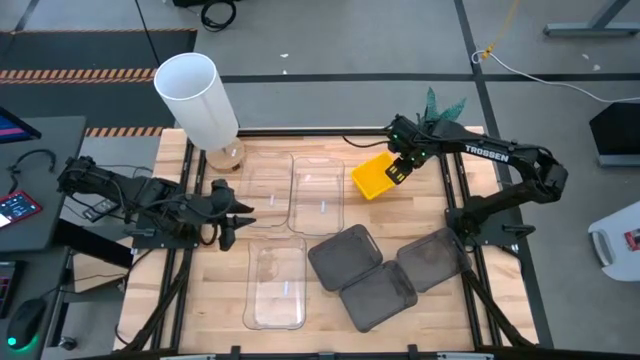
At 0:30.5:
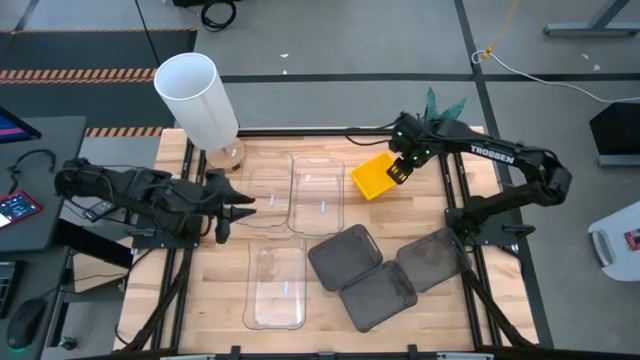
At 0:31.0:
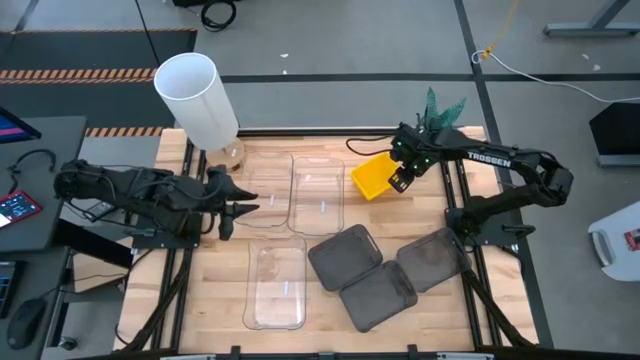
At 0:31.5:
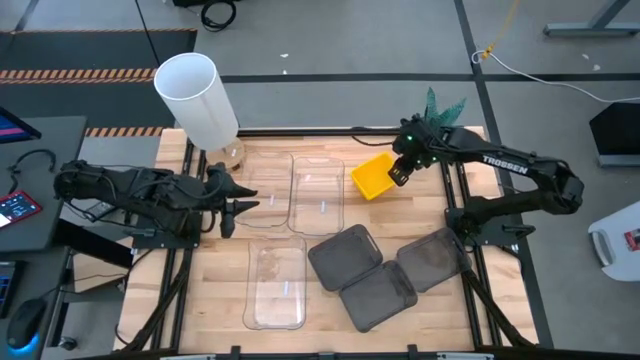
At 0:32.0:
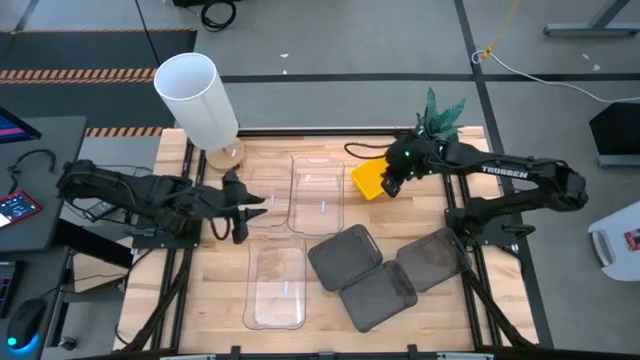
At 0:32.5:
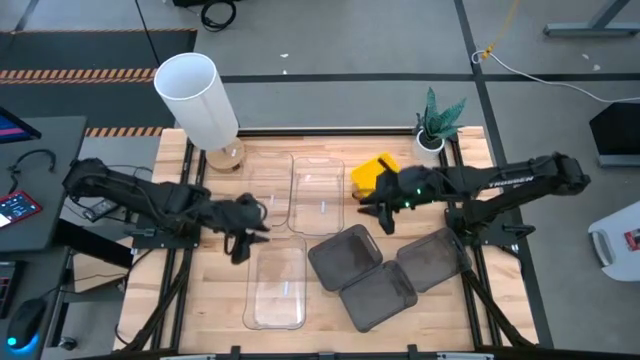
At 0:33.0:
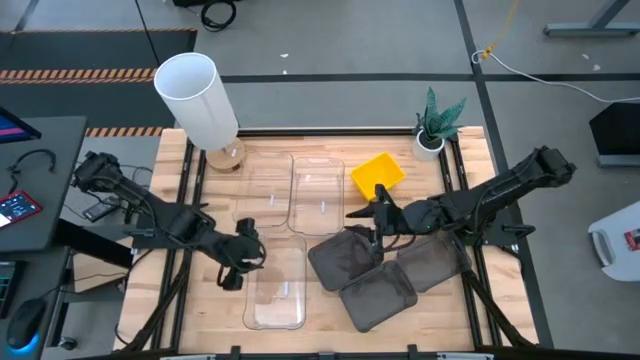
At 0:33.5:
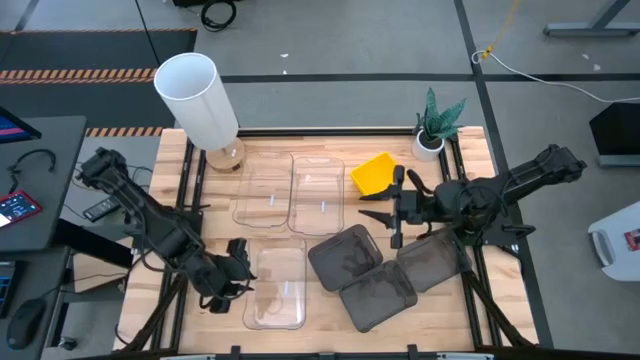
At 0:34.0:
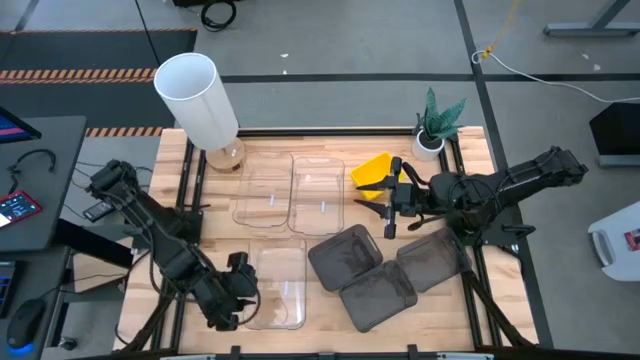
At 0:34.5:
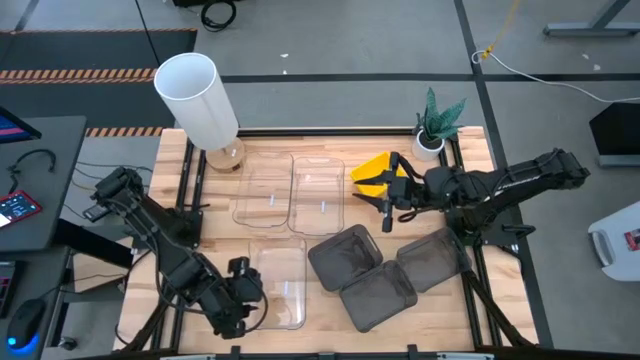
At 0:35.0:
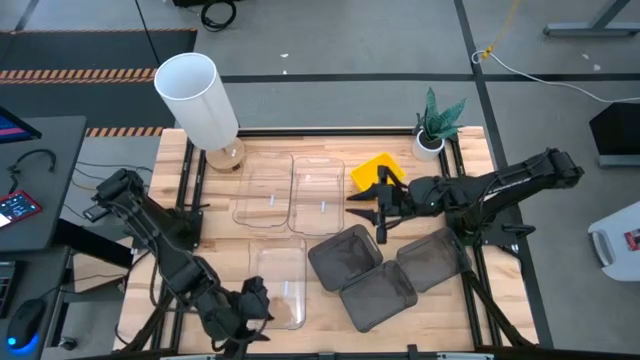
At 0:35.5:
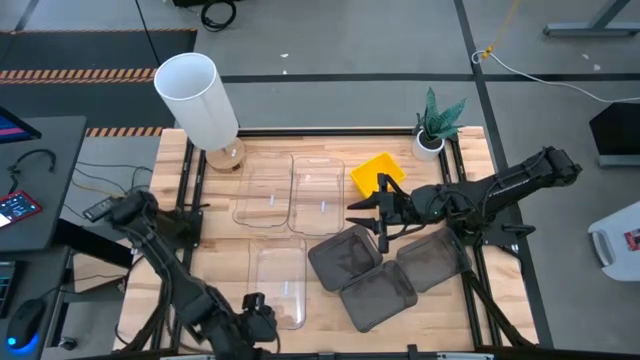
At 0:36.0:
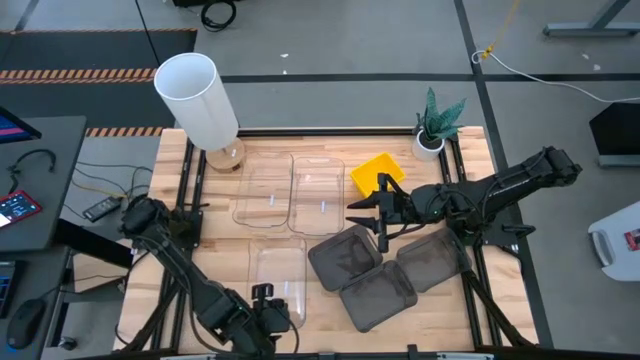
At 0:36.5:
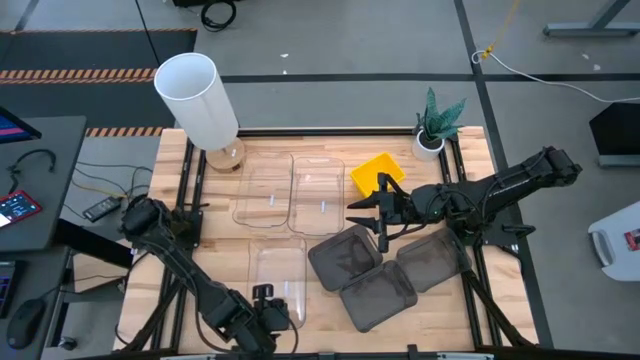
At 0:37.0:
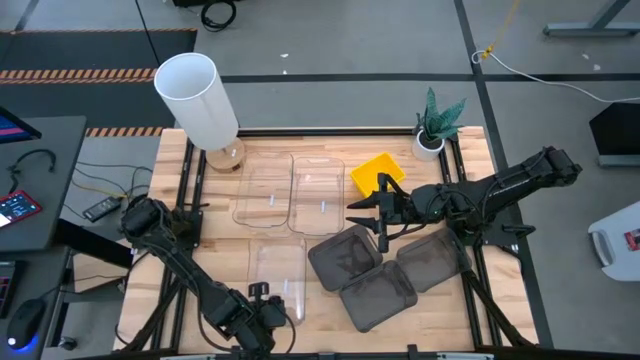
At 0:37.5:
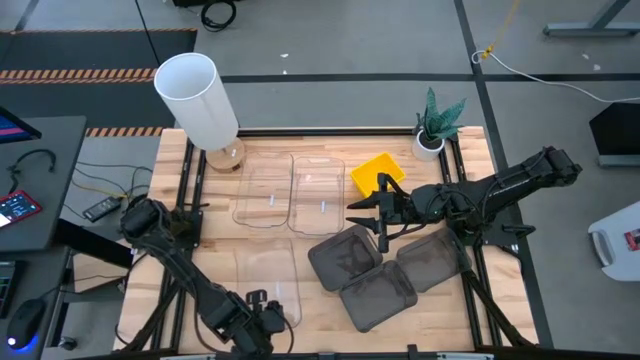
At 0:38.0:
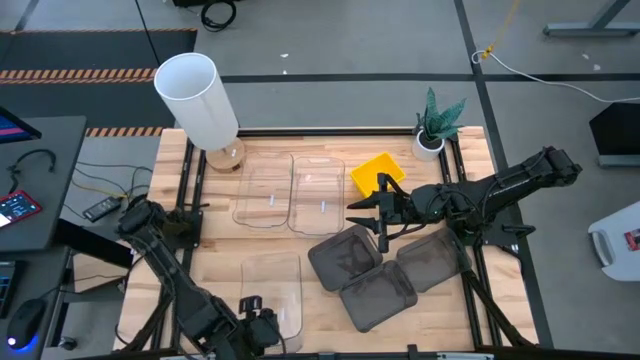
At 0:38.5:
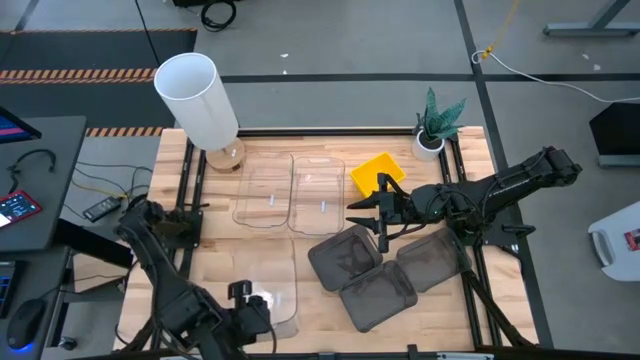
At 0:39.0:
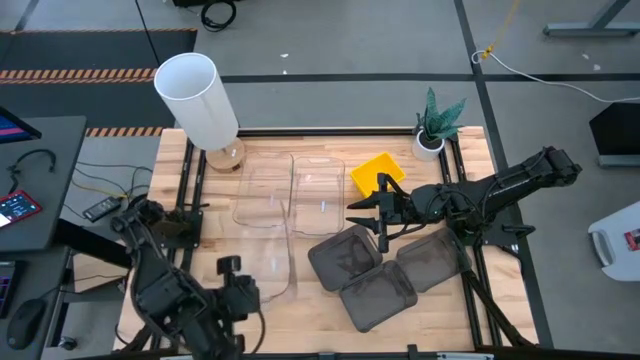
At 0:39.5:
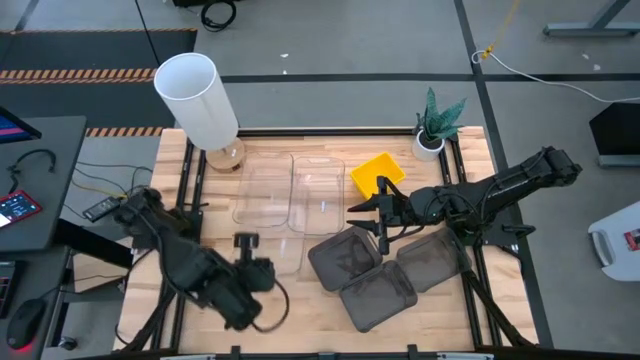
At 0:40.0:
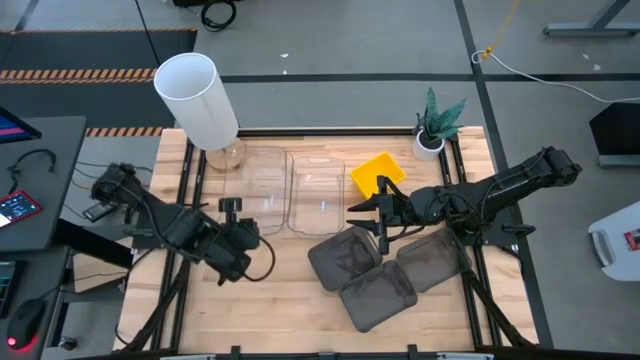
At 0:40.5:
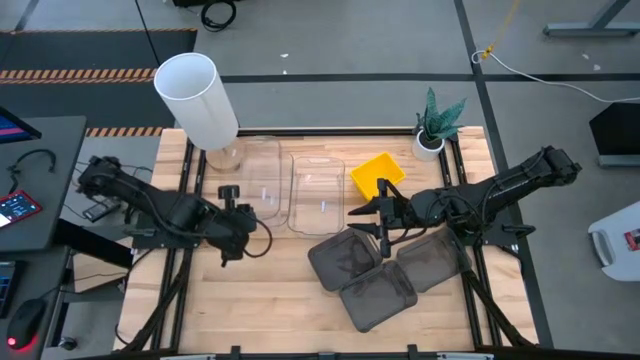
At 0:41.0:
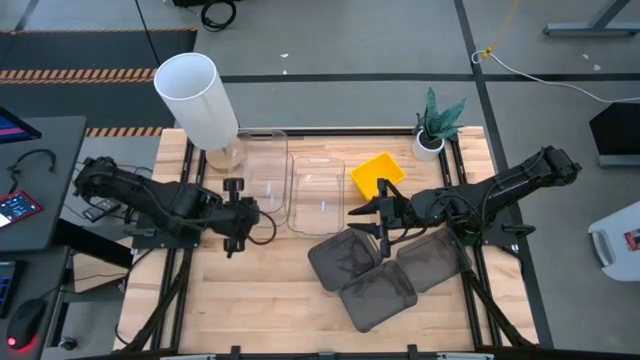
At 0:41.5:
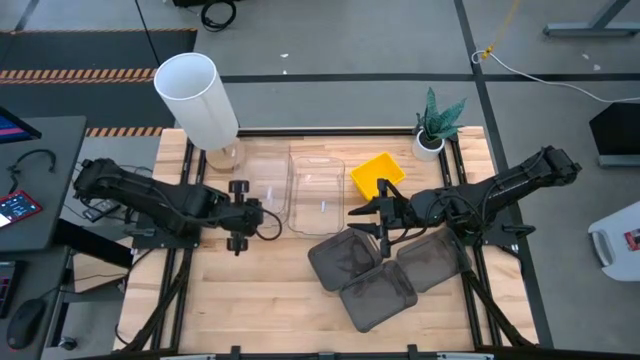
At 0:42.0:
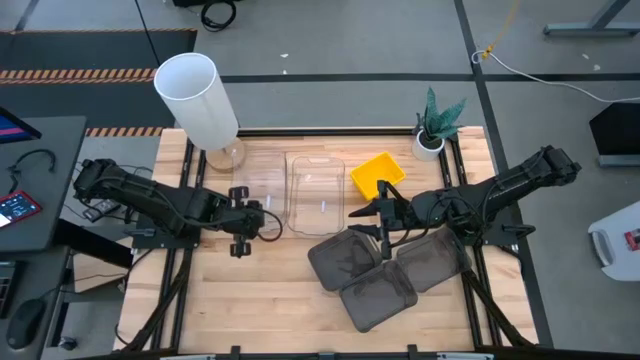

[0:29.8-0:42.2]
Stack the bottom transparent bin on top of the top left transparent bin

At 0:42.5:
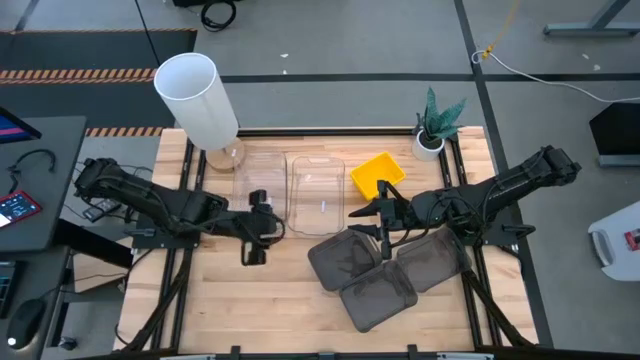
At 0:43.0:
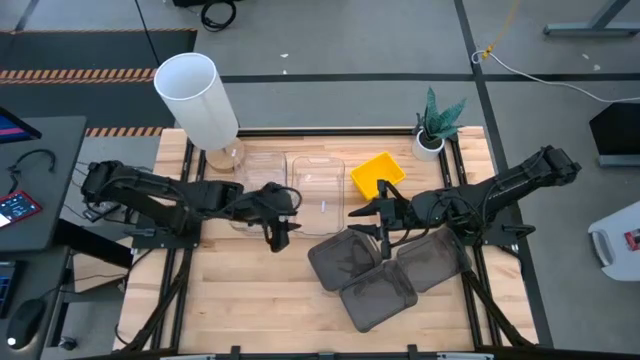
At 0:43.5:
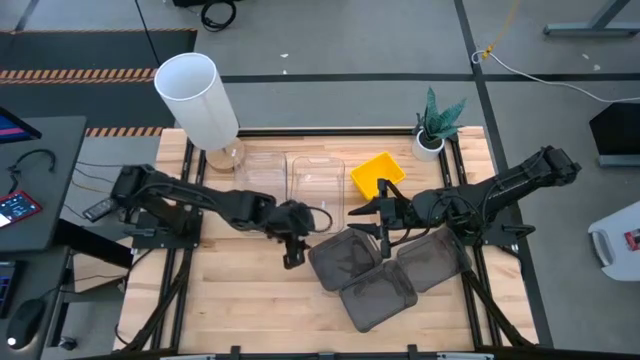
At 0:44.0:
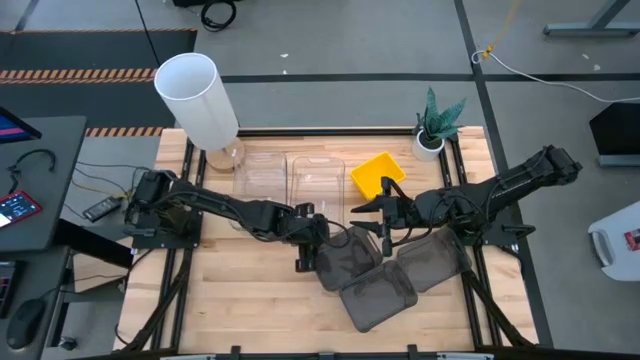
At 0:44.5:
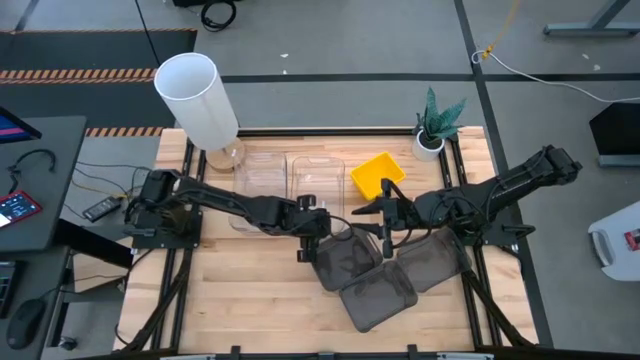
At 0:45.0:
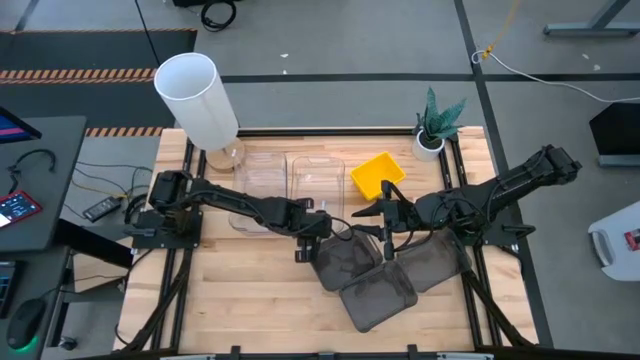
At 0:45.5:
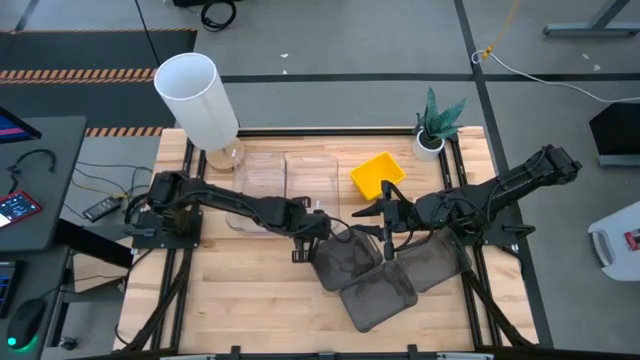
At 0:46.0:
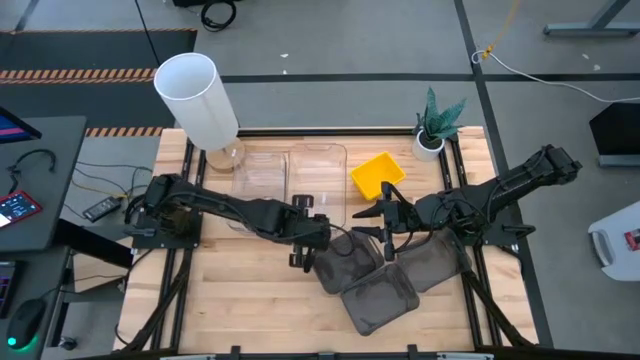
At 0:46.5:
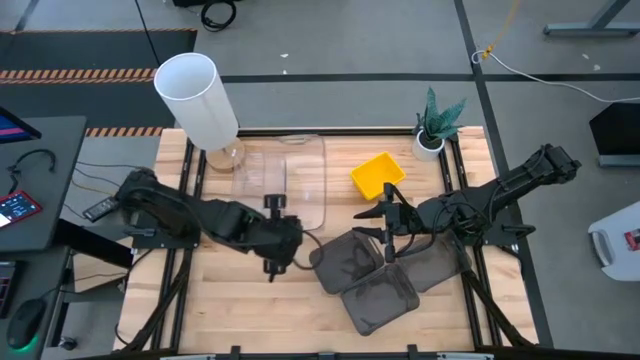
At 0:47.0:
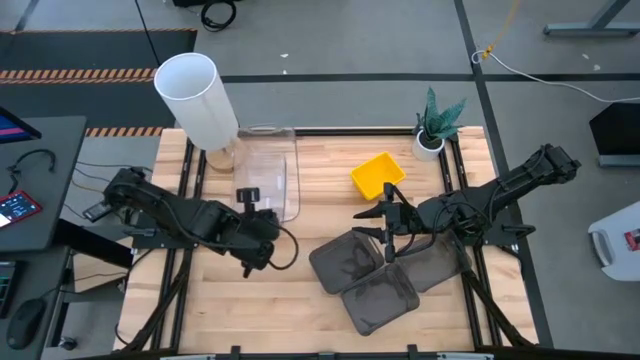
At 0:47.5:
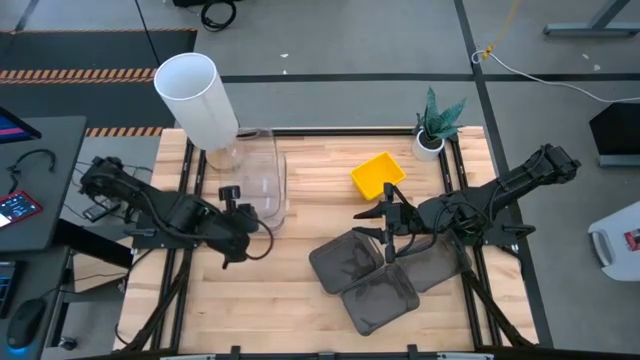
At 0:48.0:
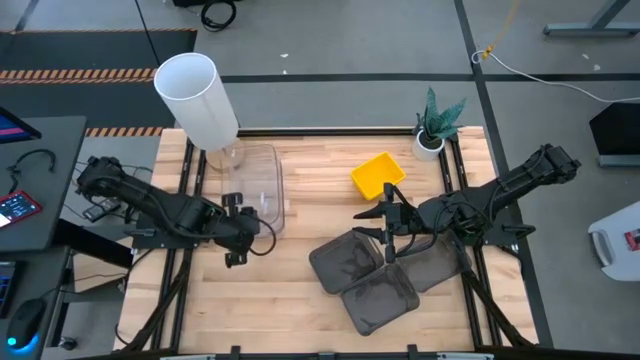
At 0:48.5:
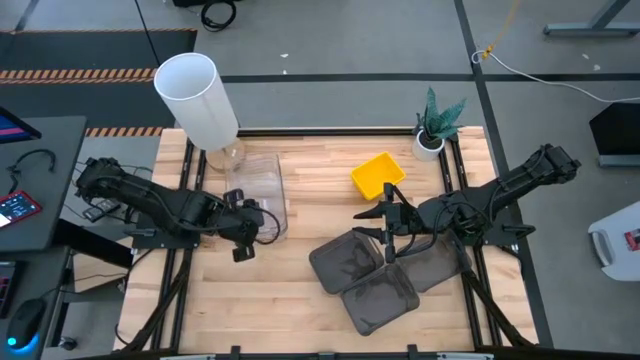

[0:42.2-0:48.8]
Stack the right transparent bin on top of the left transparent bin
